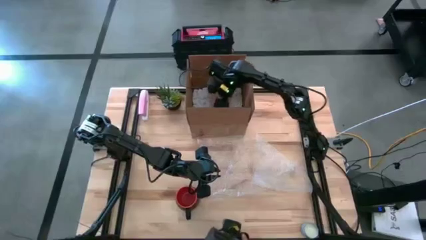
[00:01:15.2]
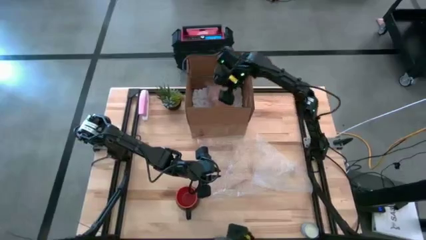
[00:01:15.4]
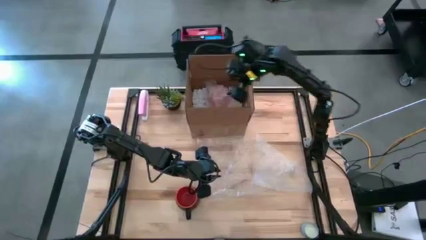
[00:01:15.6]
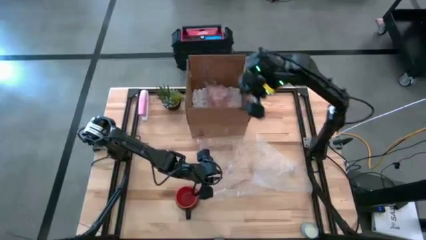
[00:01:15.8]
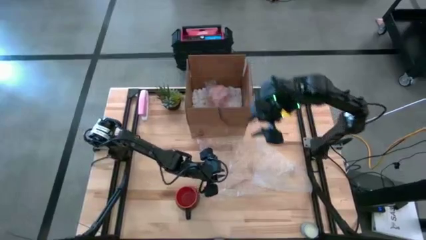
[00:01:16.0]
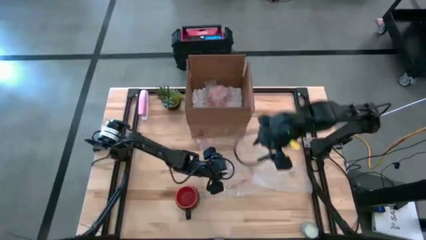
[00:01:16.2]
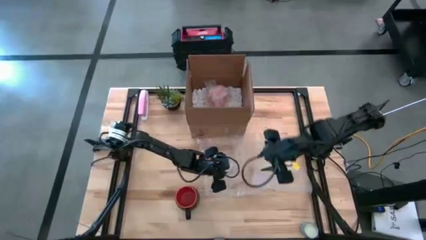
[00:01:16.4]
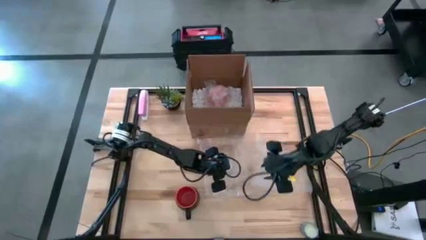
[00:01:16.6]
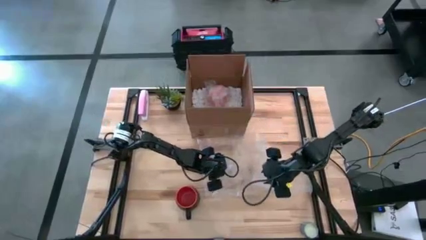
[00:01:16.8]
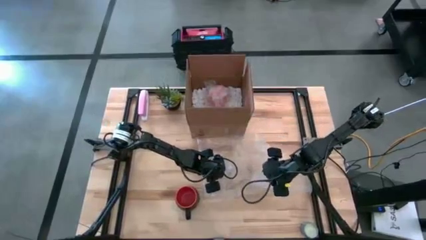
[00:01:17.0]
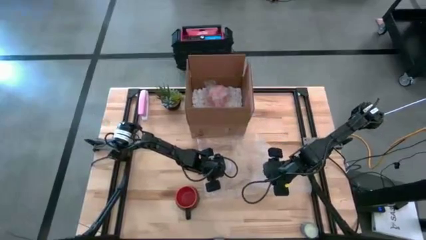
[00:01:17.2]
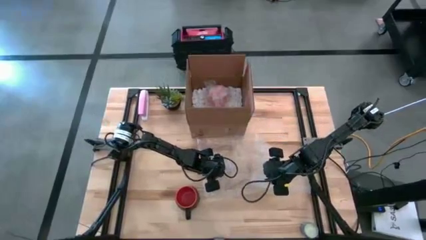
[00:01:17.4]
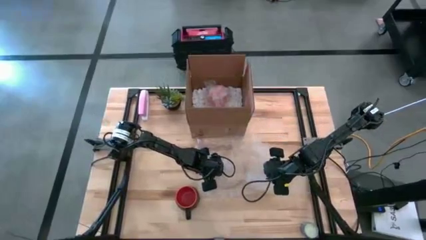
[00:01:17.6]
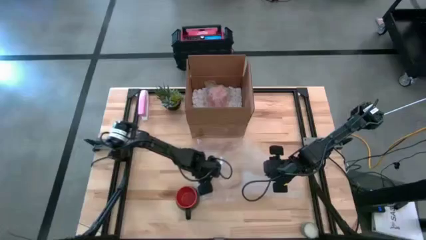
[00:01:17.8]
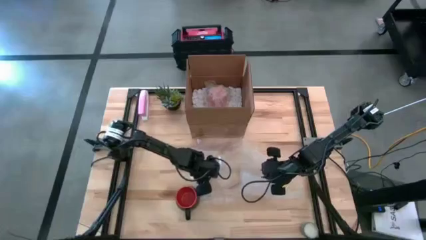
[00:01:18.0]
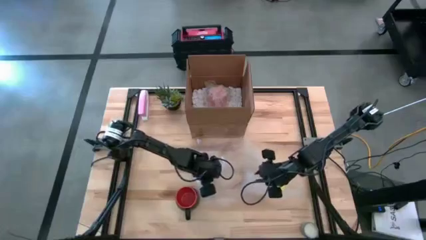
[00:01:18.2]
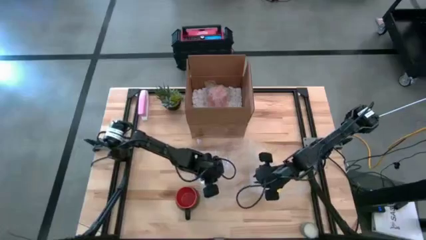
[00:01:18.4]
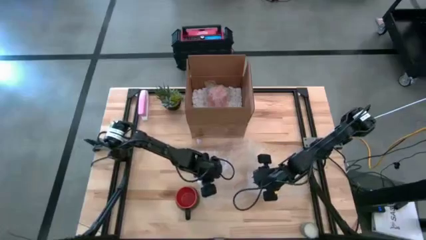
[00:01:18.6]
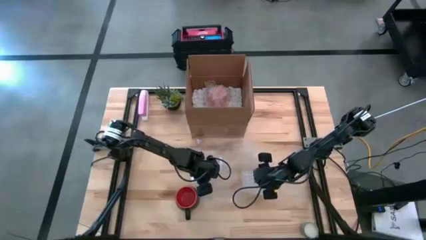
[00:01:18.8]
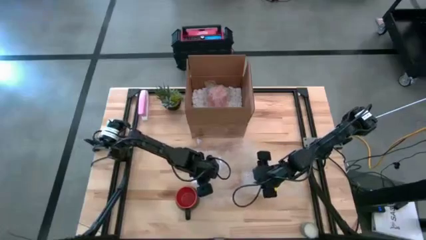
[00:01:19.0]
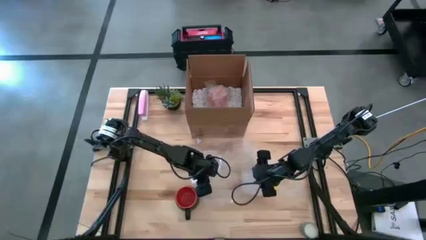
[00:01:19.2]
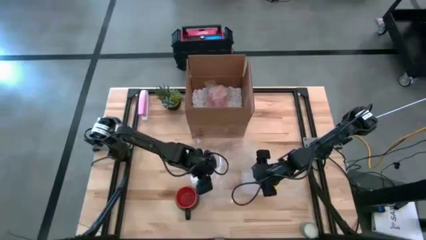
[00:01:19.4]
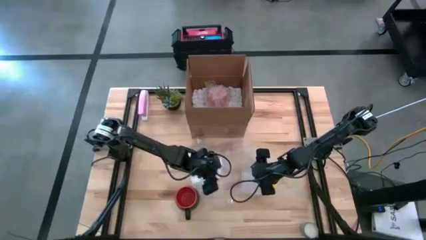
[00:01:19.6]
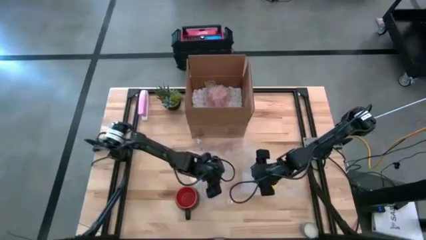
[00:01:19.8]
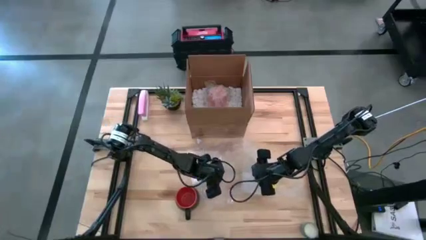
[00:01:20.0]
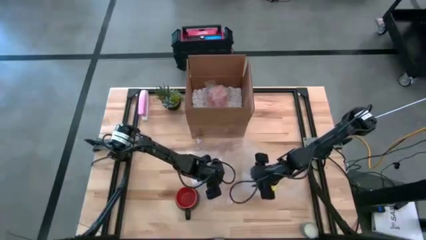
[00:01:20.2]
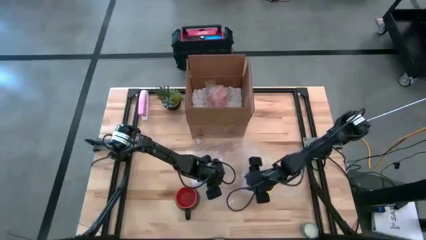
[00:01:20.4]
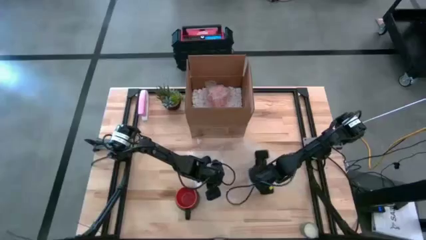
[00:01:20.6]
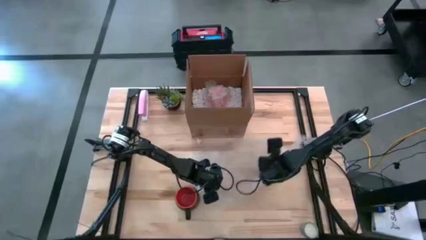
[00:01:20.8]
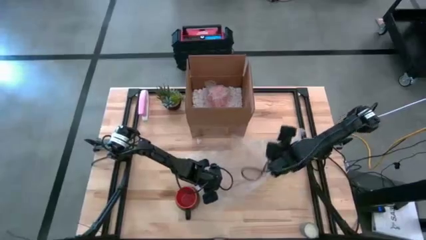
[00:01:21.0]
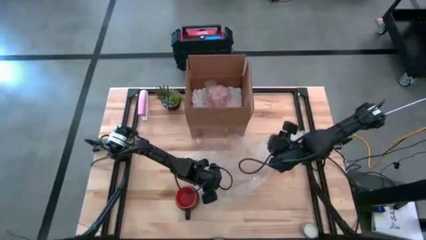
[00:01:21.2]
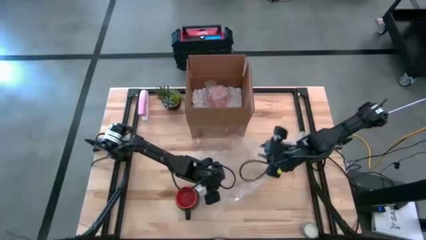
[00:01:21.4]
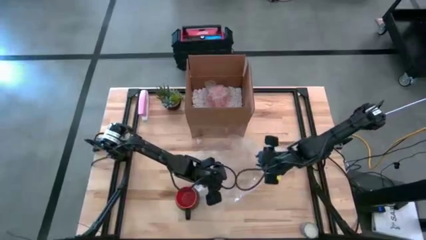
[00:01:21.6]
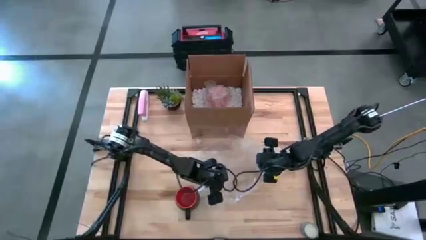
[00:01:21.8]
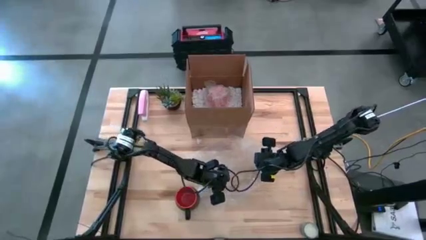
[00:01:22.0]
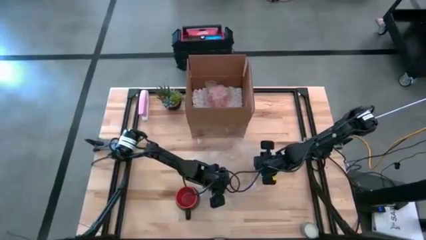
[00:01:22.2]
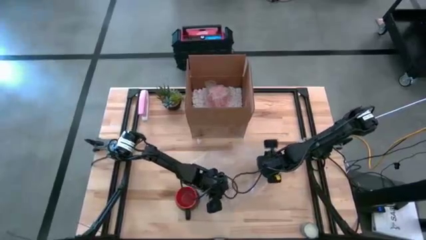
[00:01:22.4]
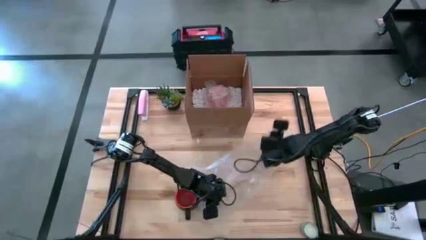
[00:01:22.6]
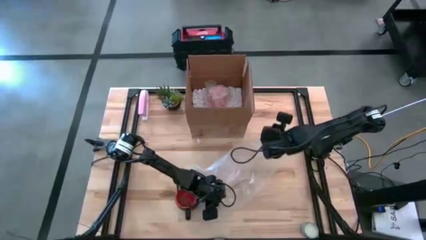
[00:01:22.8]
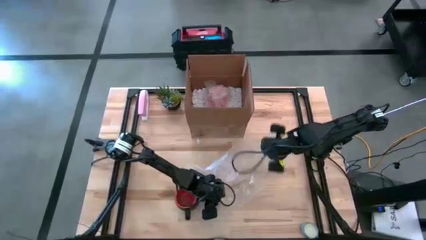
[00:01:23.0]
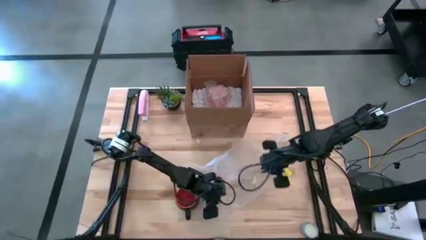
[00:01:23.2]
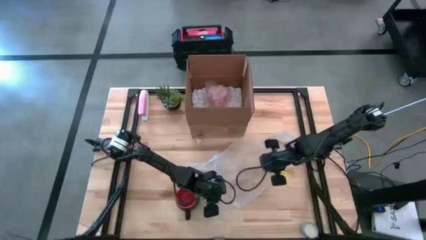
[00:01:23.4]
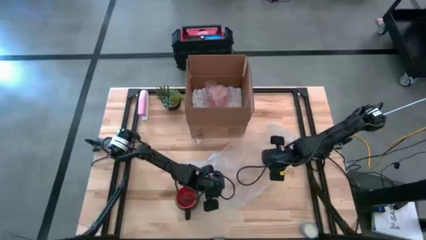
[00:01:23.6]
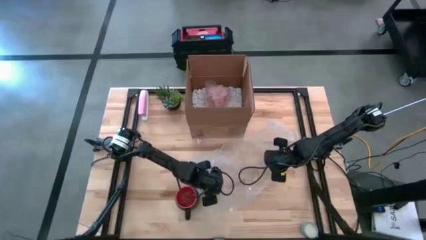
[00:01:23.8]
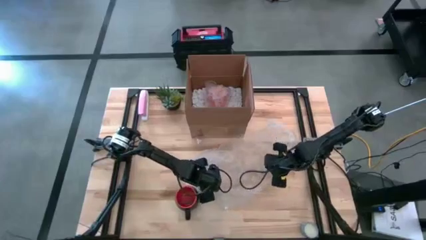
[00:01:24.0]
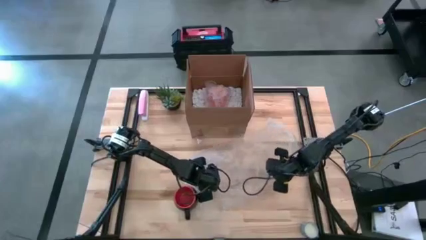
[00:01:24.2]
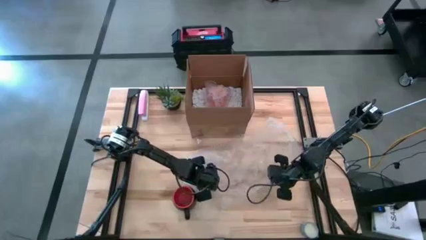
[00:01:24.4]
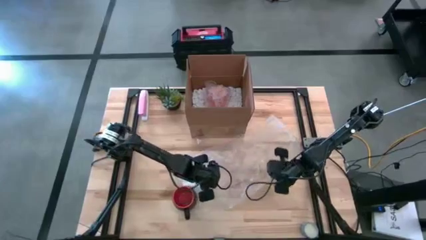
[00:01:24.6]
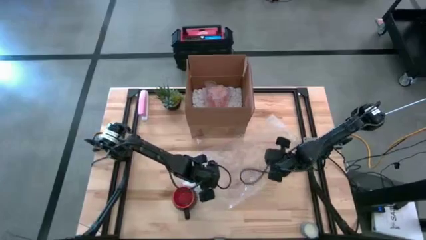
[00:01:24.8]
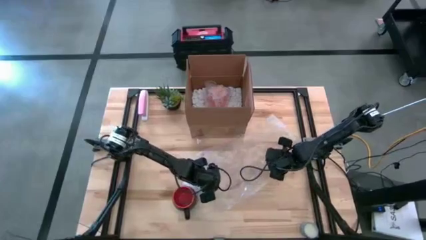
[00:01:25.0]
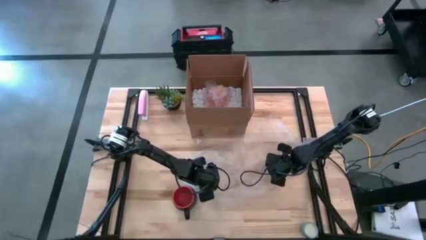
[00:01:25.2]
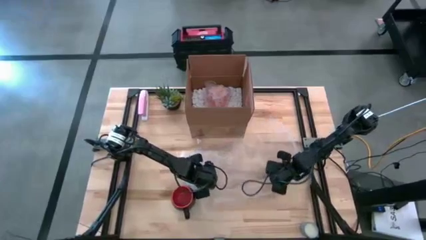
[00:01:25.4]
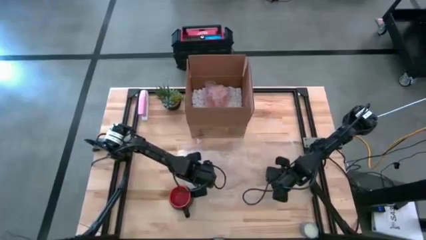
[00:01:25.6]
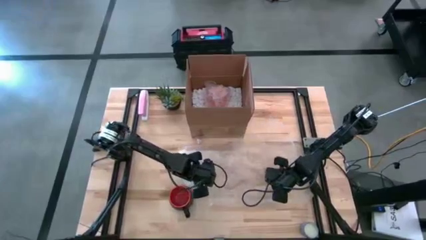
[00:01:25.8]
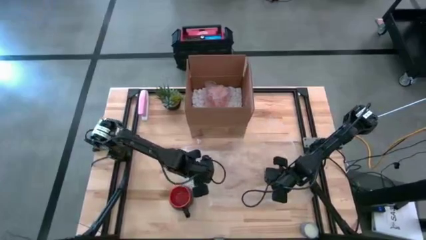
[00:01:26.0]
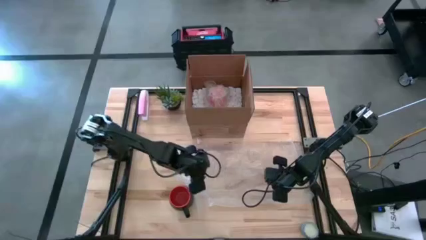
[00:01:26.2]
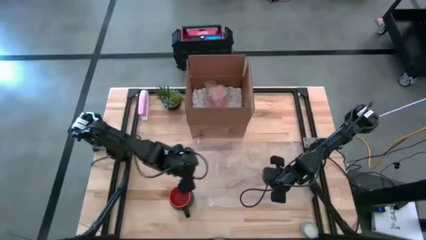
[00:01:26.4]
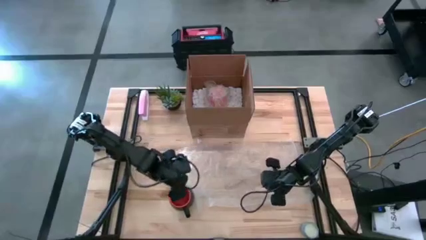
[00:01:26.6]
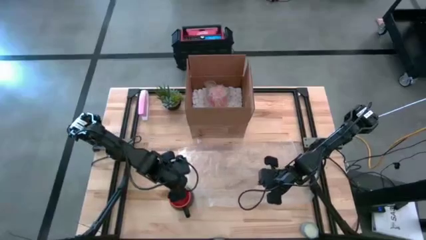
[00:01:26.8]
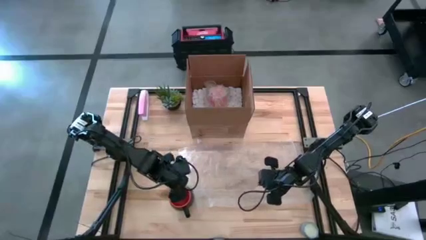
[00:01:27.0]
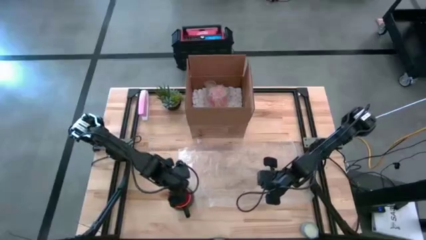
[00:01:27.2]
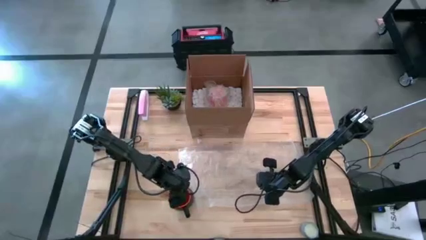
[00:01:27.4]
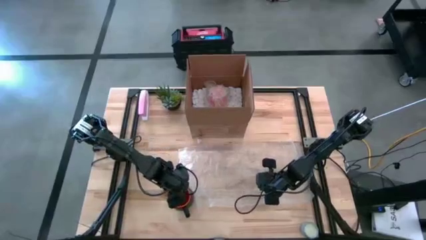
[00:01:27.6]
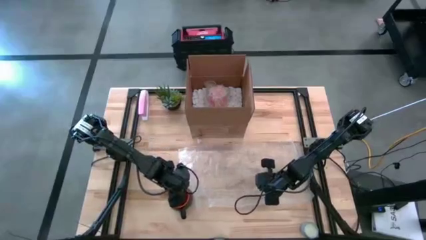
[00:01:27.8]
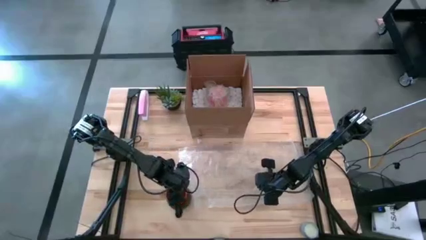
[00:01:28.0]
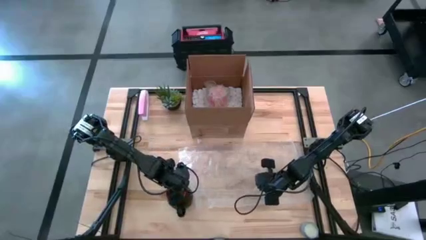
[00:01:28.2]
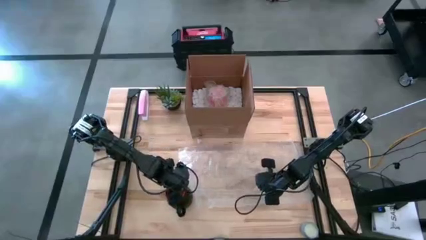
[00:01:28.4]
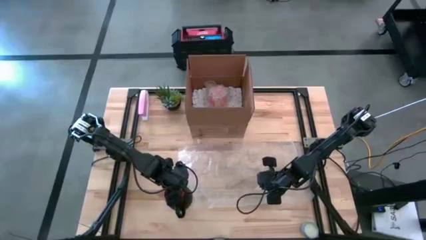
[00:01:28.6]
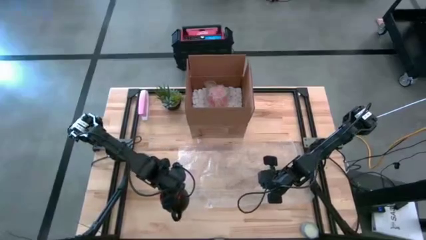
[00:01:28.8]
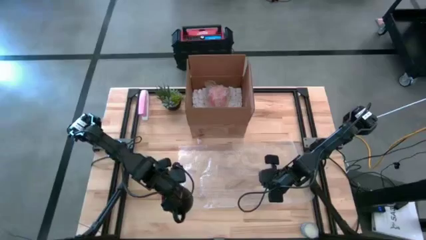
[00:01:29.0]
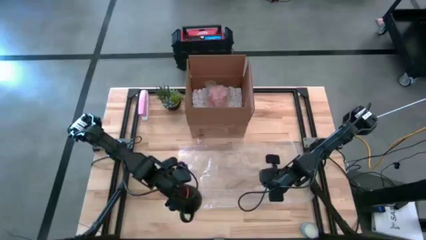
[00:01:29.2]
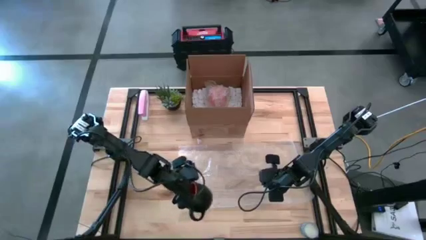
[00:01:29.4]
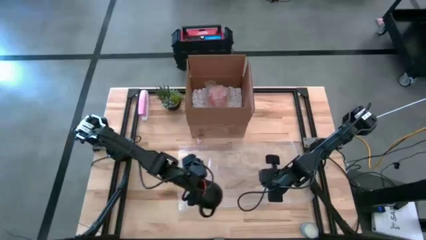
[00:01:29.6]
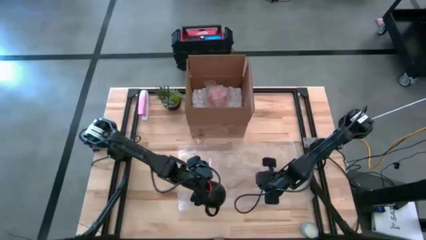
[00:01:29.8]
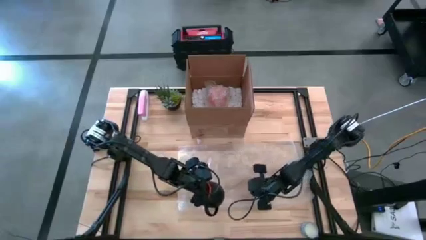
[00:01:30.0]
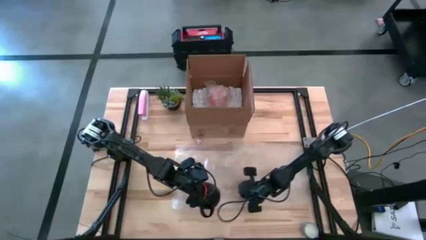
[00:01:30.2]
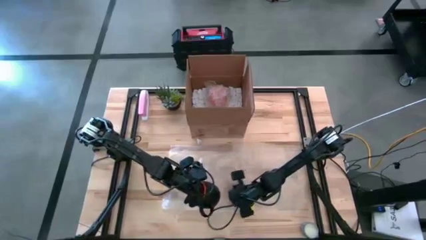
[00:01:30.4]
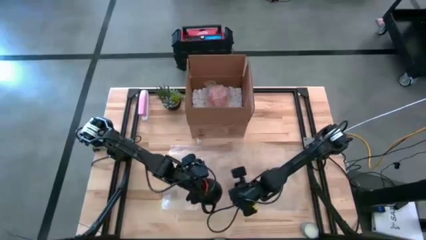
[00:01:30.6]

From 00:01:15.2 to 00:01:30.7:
Task: wrap mug
Wrap the black mug with the bubble wrap
